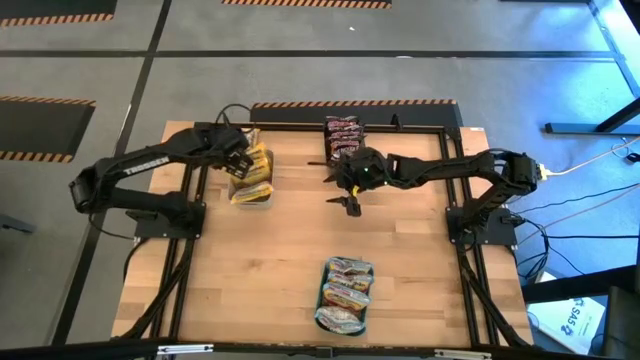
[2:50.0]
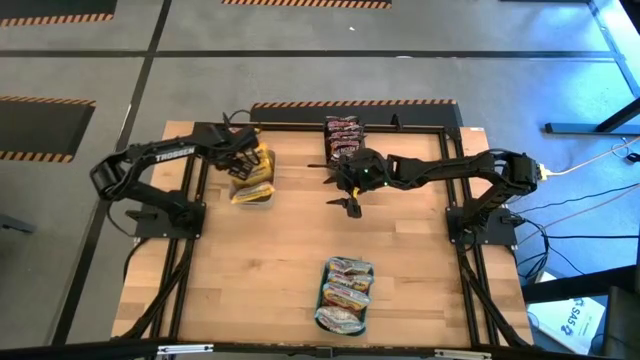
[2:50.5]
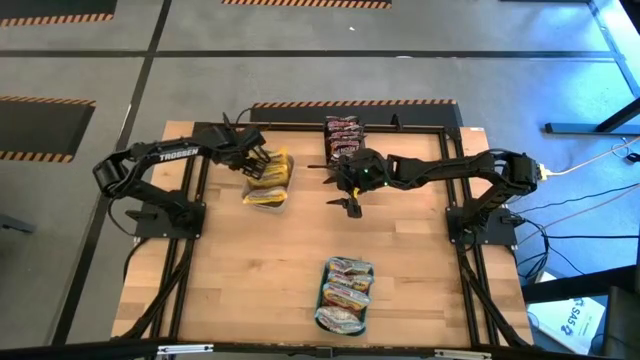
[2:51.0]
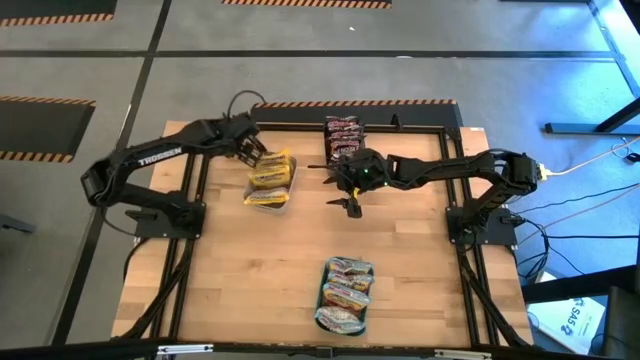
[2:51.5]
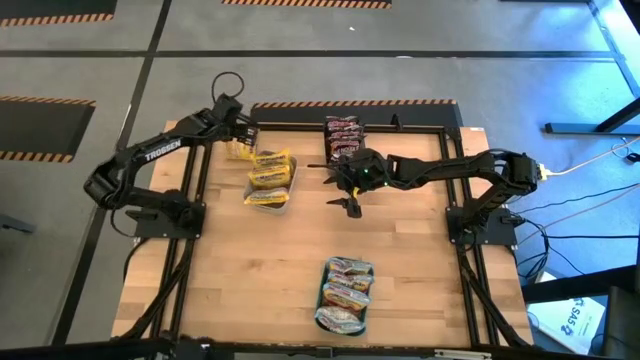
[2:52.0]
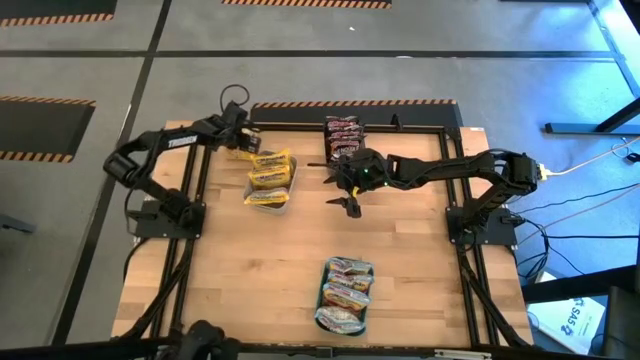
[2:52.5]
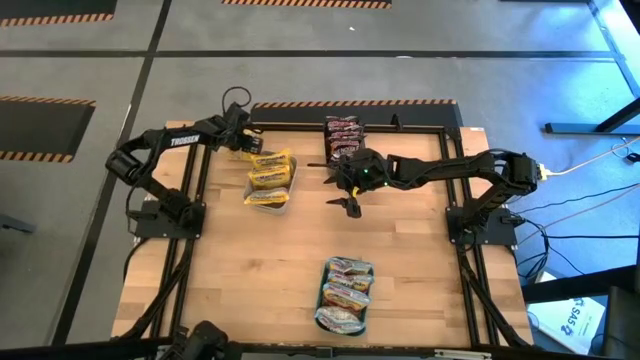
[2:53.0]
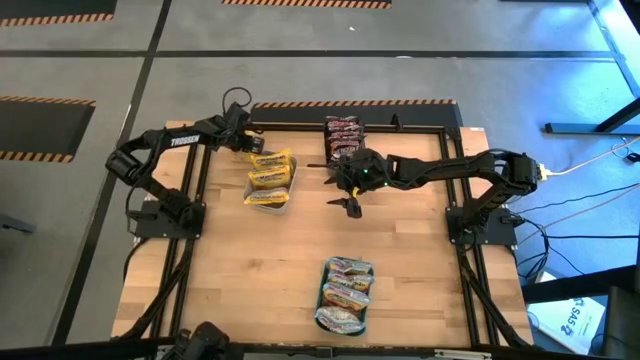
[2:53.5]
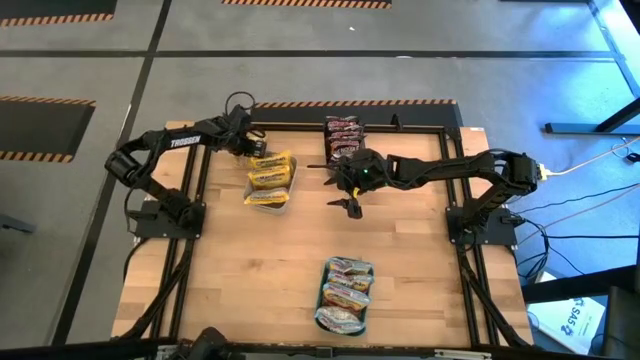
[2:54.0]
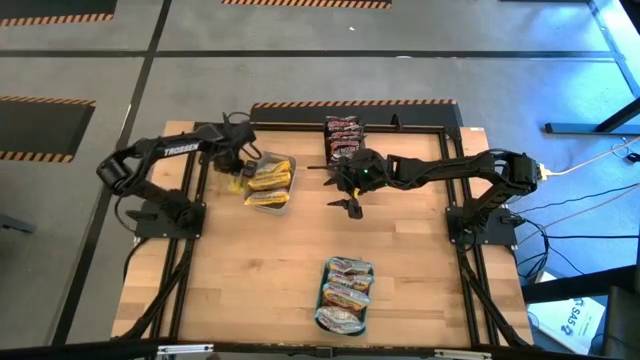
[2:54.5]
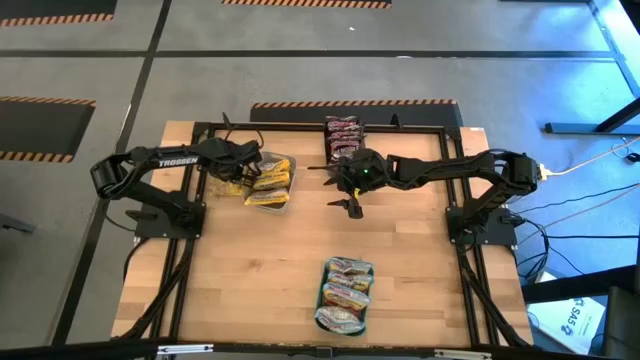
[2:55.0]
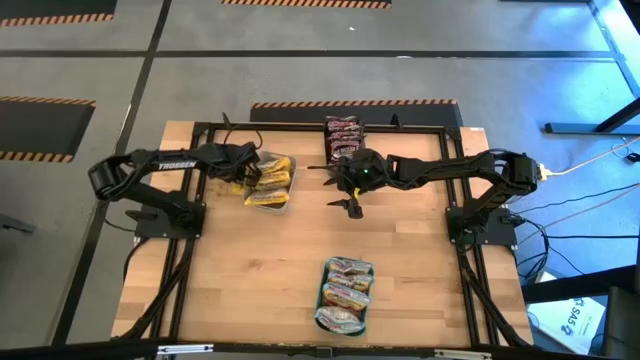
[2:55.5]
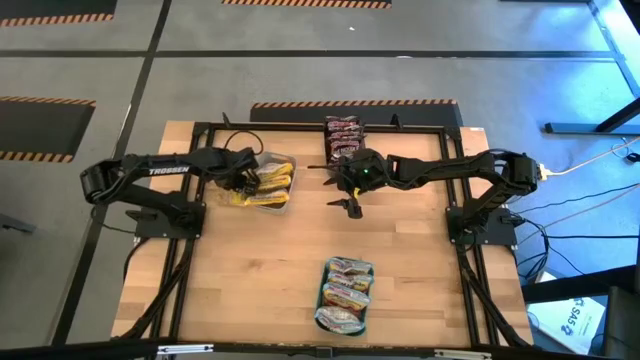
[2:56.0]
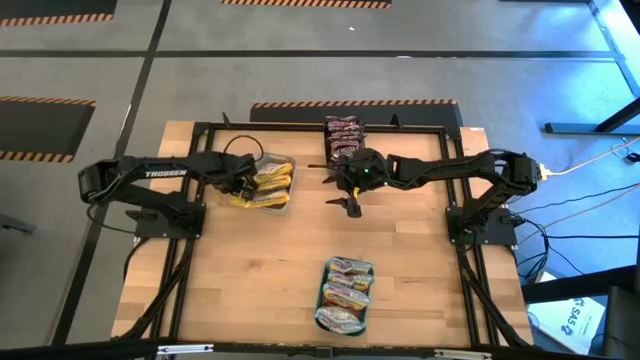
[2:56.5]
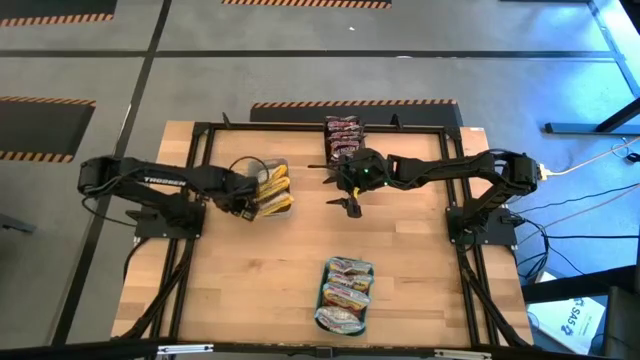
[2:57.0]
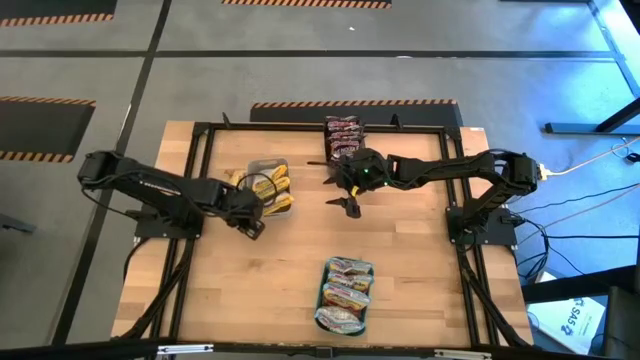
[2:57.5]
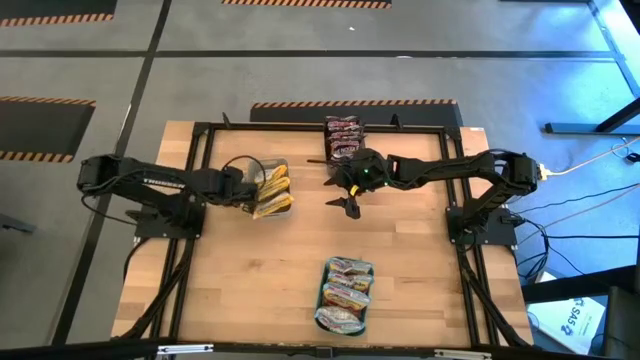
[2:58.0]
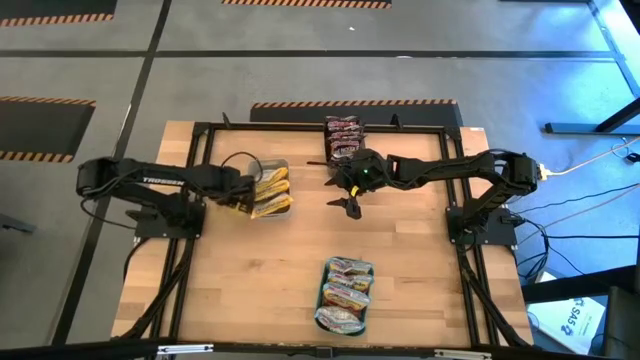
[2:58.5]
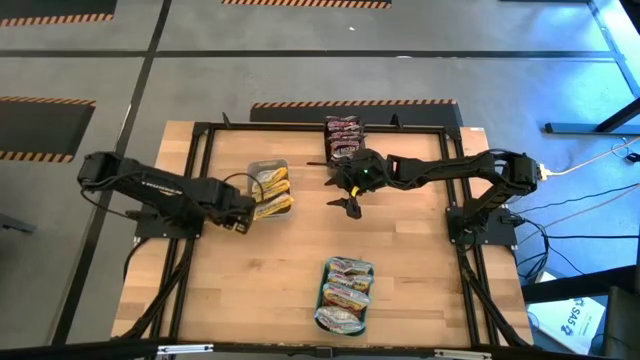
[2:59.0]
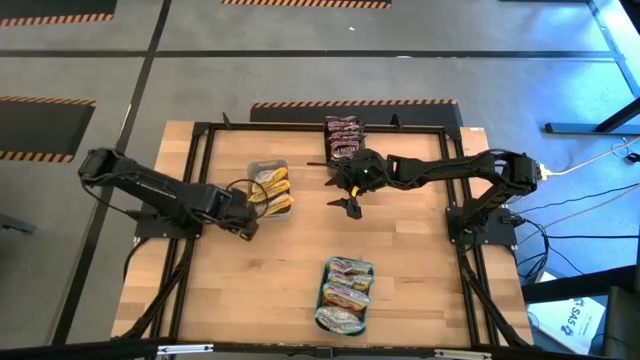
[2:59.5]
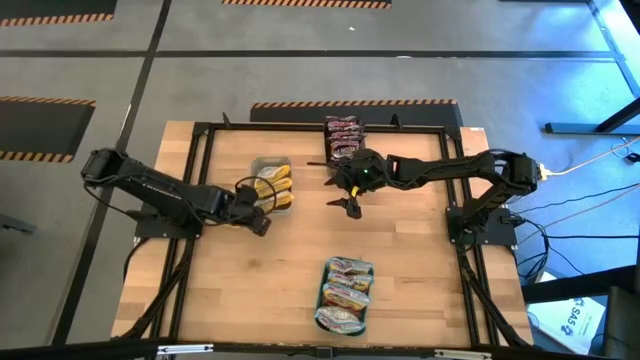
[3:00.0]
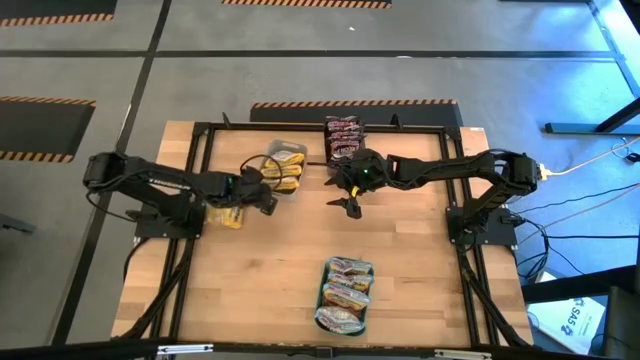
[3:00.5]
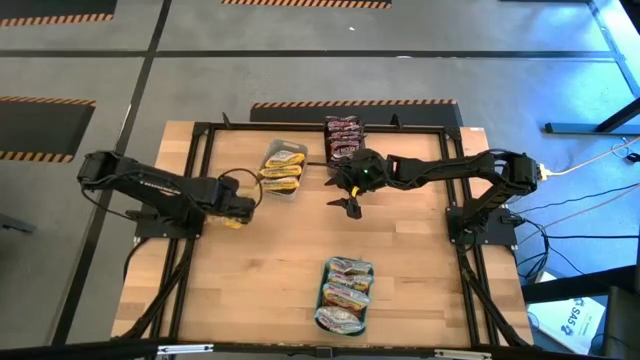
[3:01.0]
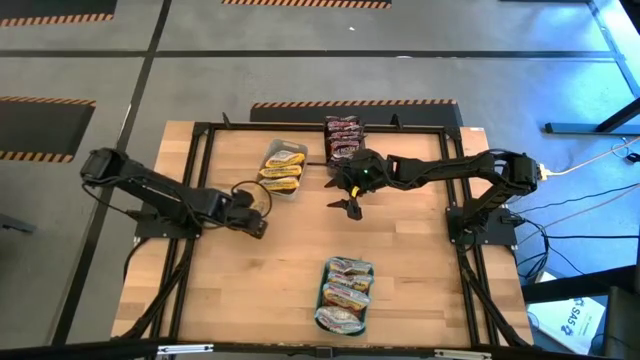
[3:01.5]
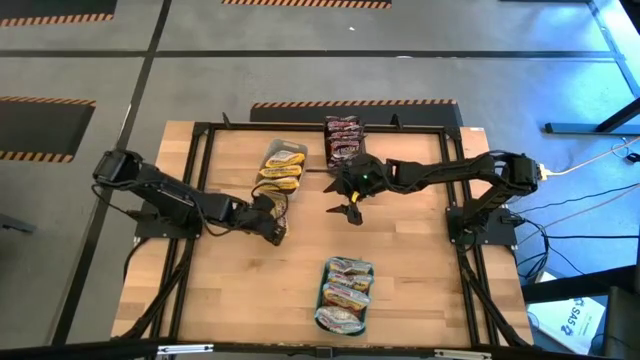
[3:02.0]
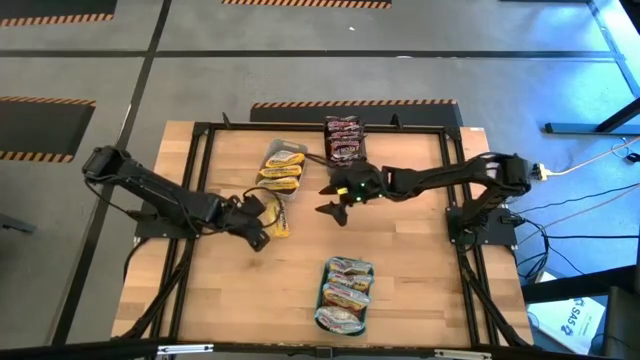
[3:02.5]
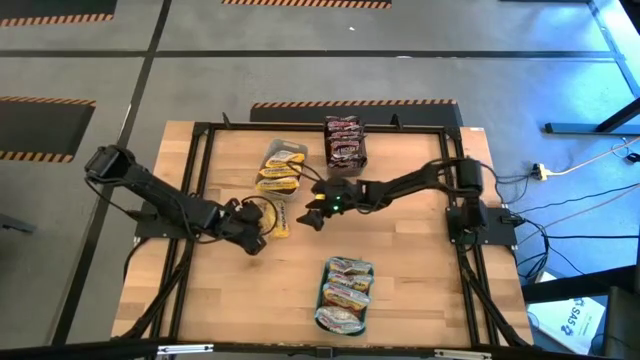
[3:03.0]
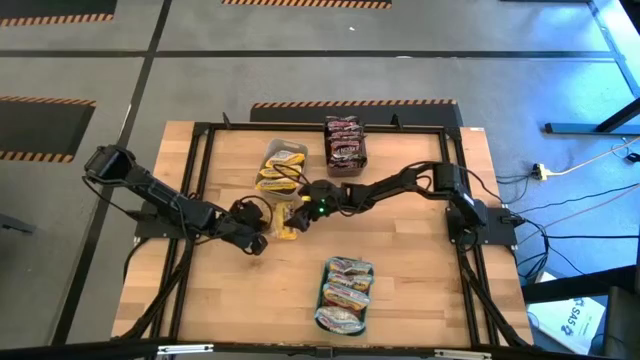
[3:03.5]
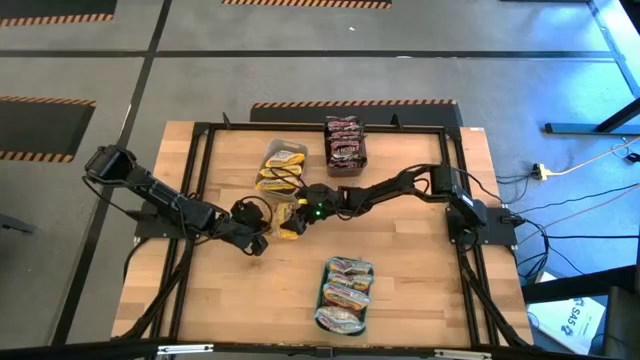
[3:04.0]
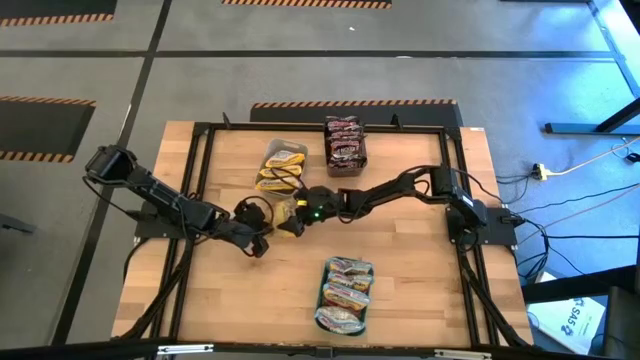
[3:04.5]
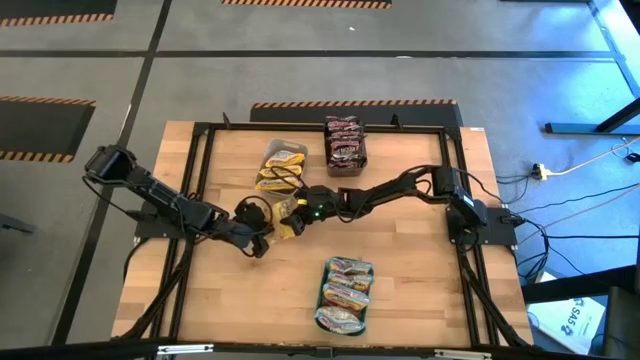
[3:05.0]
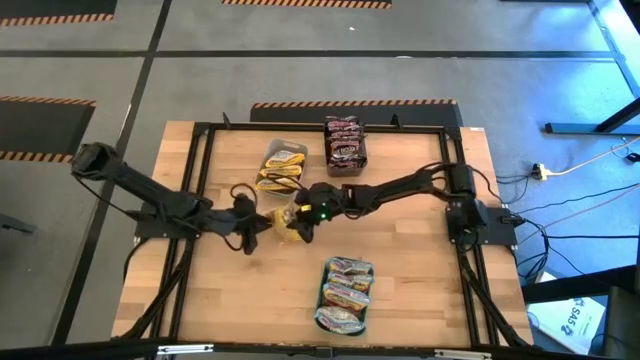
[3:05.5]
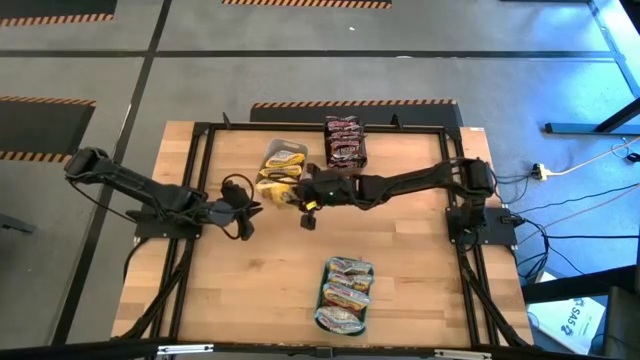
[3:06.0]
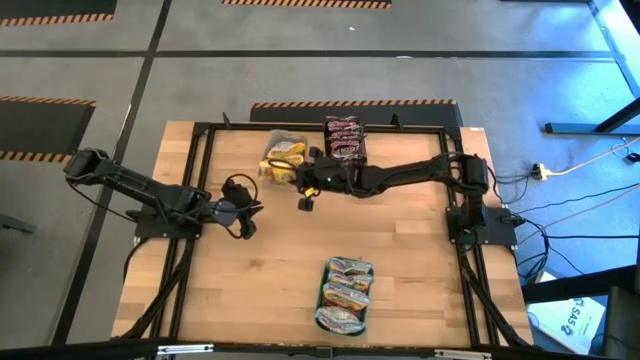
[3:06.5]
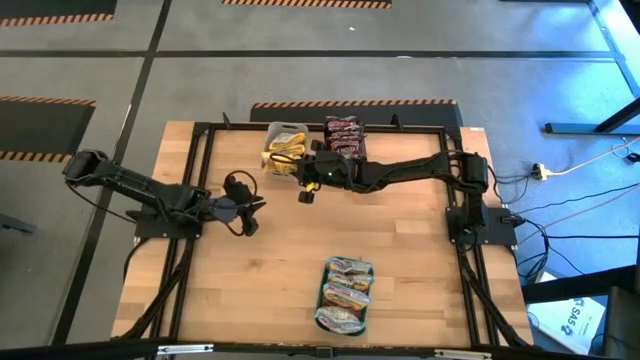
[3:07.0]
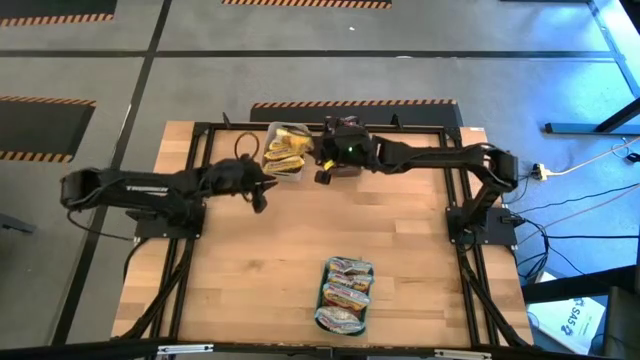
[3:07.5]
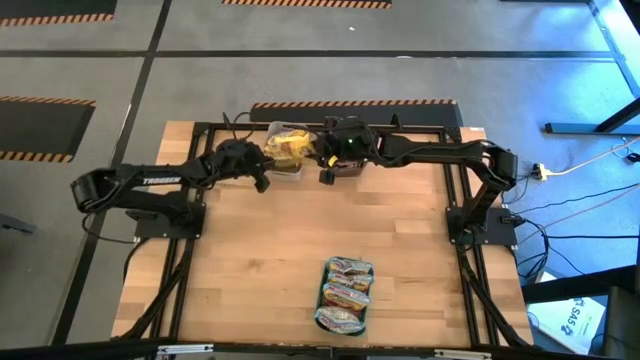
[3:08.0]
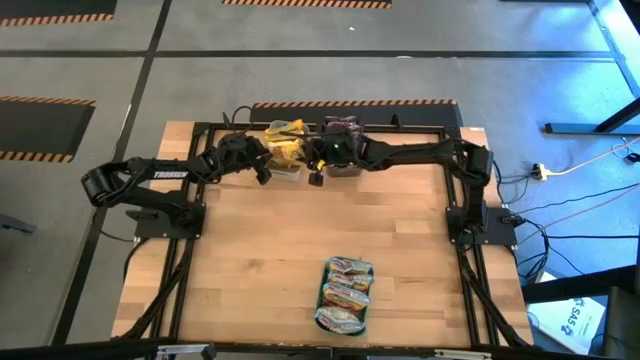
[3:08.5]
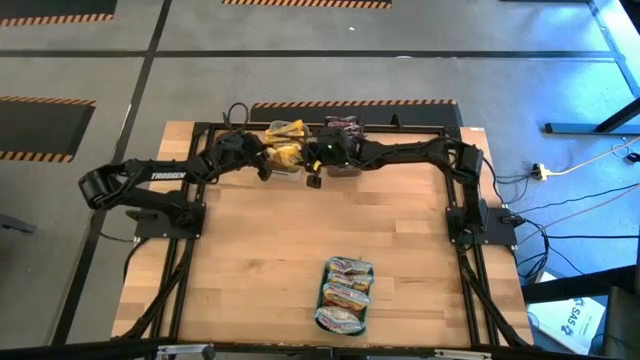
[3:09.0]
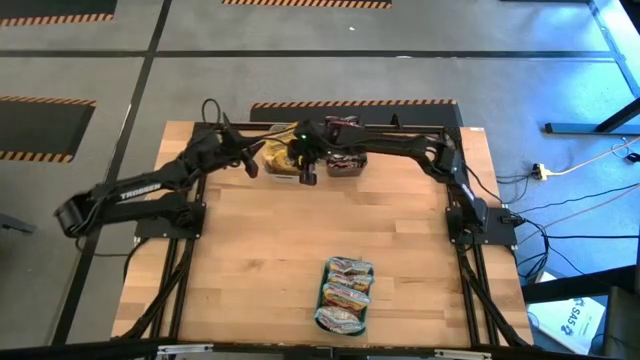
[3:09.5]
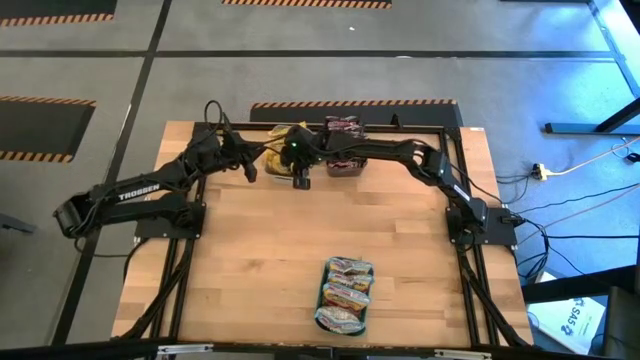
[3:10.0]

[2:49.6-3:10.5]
Task: Sort Maruchan noodles
Put the yellow noodle pack into the white bin
